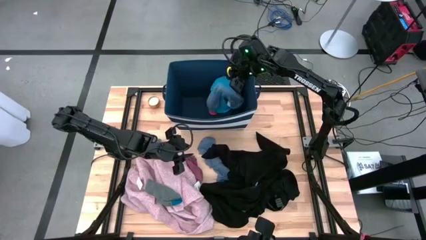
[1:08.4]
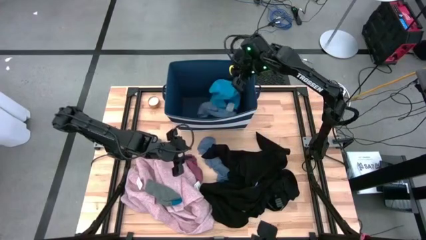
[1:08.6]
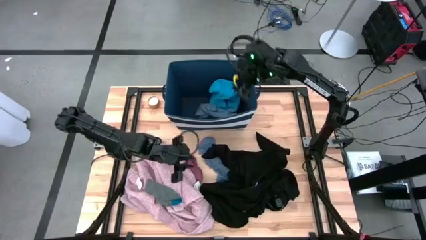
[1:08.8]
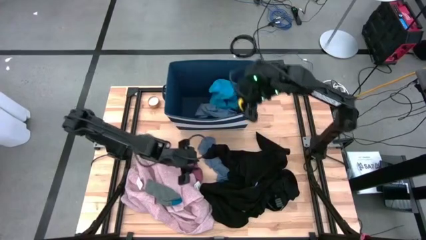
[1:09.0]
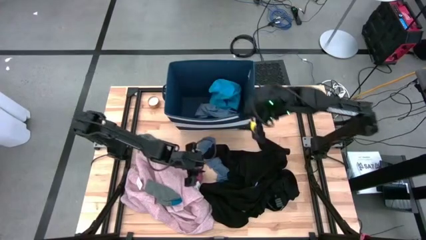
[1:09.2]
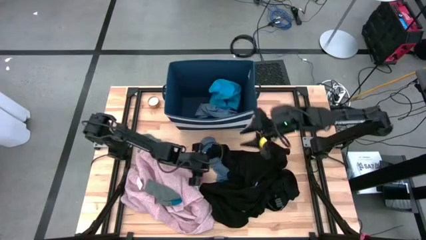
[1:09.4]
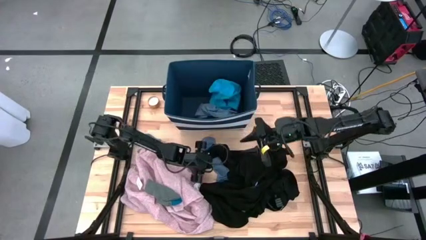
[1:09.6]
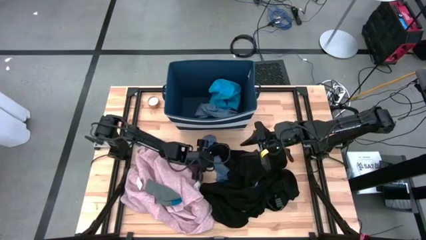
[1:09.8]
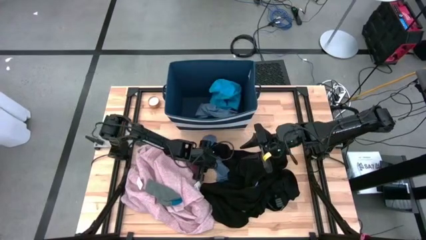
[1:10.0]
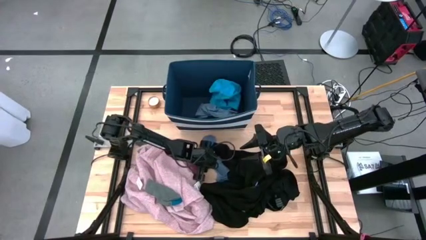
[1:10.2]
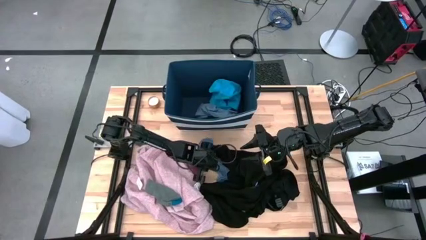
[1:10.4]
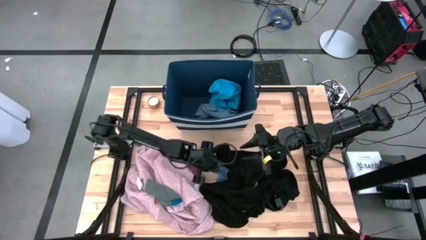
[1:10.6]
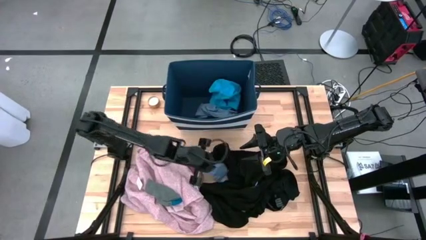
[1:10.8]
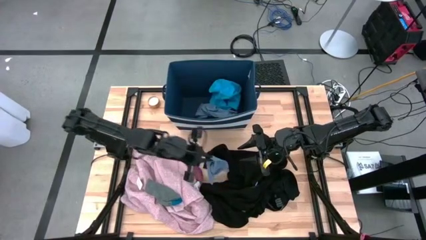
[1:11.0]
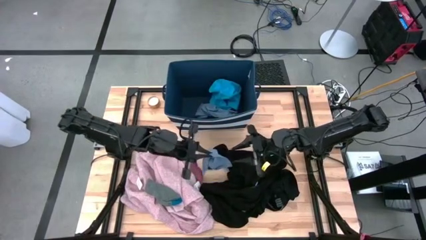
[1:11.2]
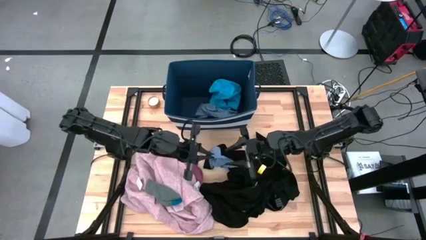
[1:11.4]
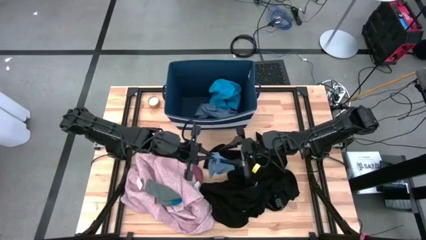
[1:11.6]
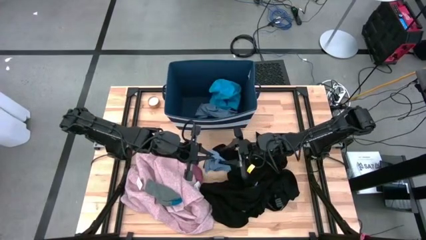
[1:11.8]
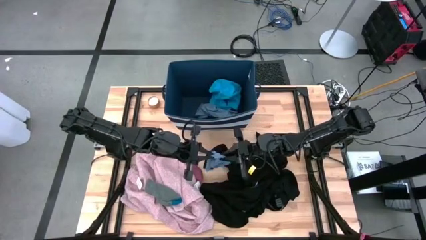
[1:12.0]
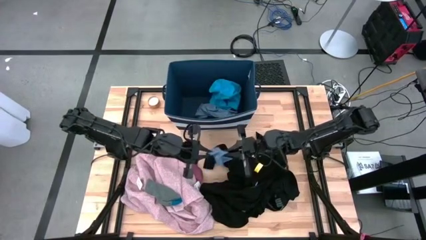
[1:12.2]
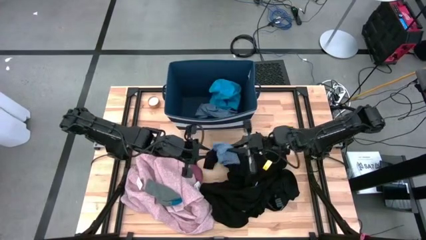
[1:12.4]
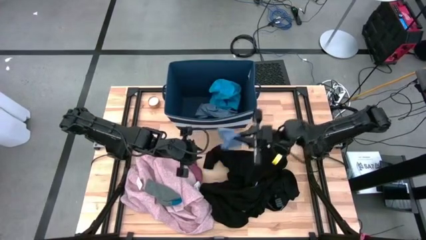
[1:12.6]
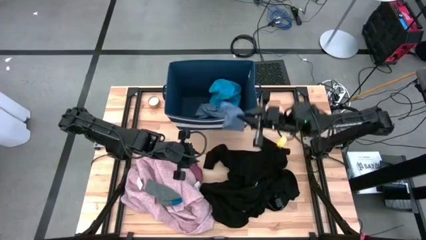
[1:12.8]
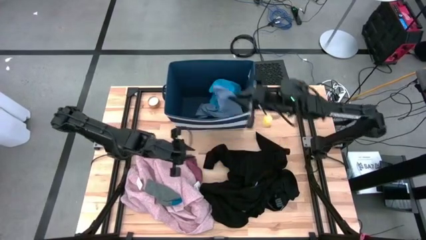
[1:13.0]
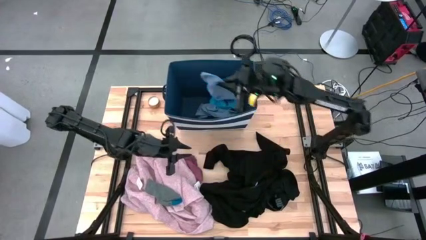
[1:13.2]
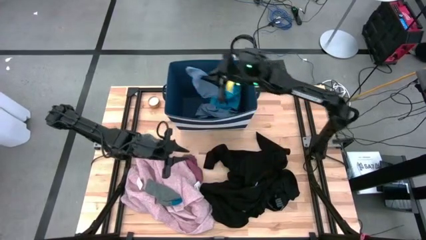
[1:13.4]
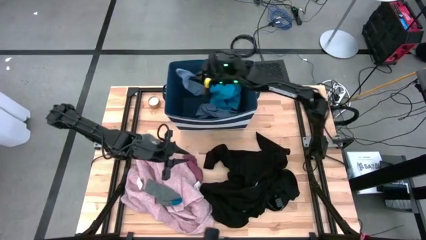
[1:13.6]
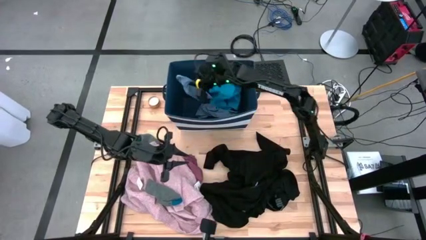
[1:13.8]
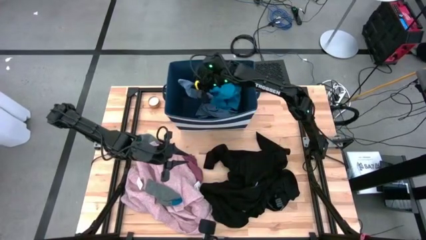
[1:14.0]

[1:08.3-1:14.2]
Task: Sort clothes
Put the light blue sock into the blue laundry bin

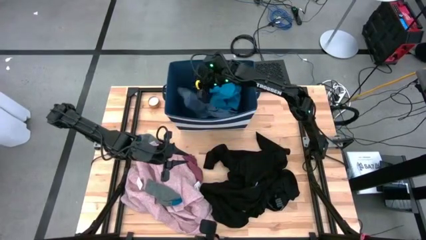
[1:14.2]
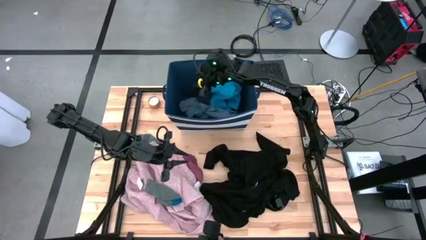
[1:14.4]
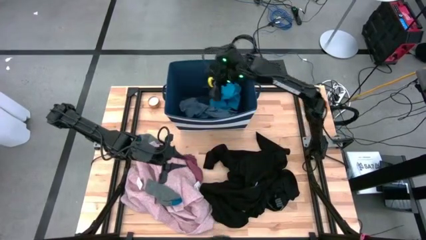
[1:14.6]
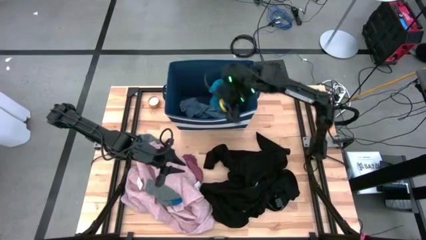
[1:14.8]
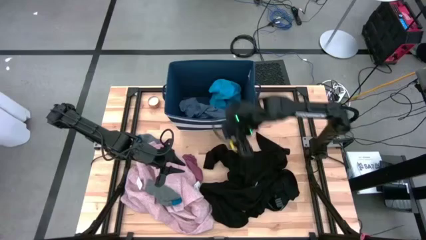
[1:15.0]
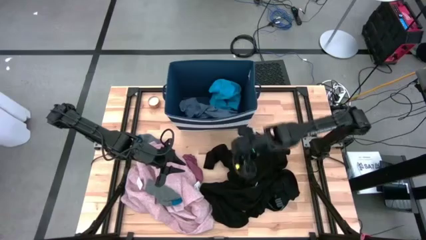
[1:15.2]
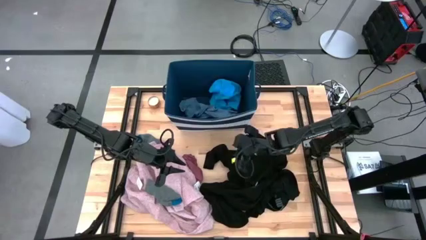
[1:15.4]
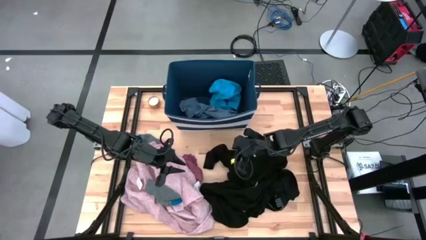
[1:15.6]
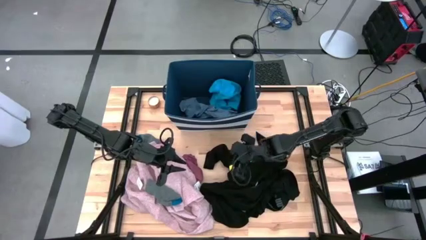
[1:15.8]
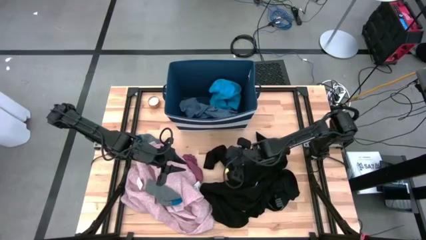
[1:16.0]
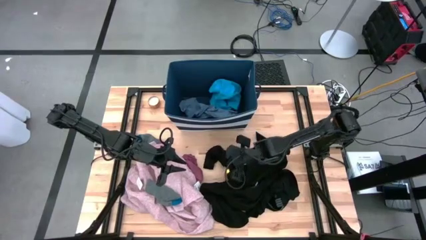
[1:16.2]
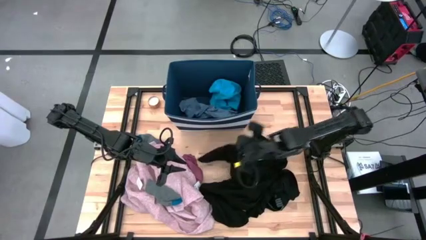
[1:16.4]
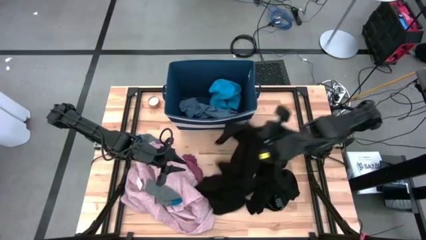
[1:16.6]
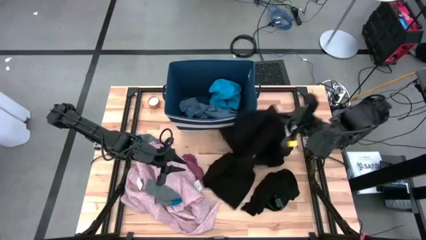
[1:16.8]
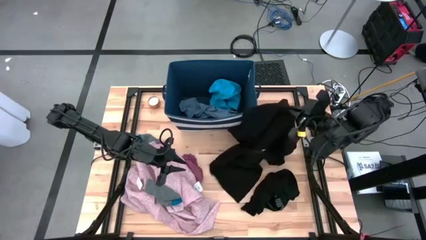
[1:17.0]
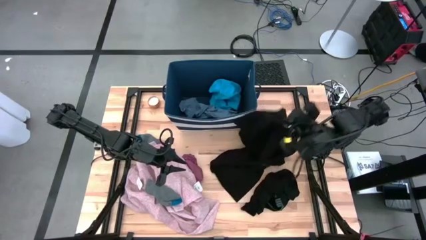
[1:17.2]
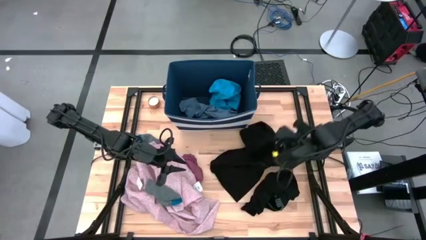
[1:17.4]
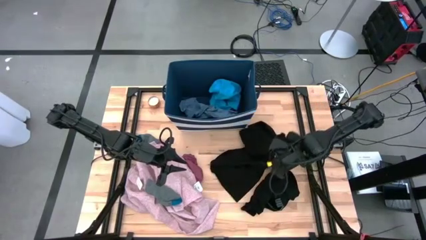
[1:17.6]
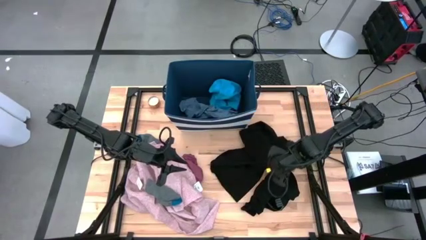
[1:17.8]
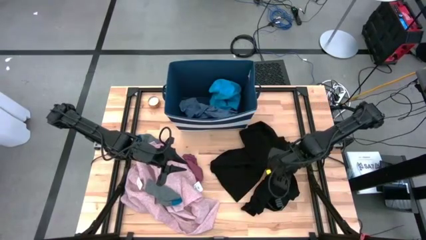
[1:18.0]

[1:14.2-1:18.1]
Move the black shirt to the center right on the table

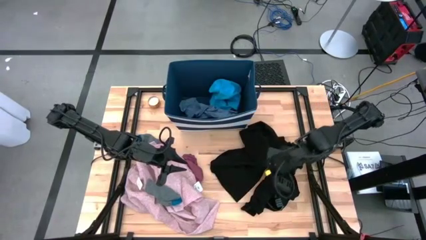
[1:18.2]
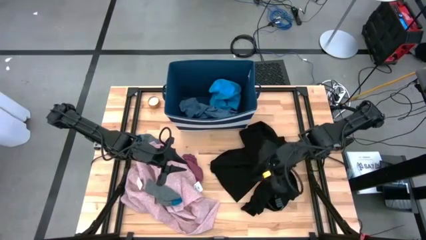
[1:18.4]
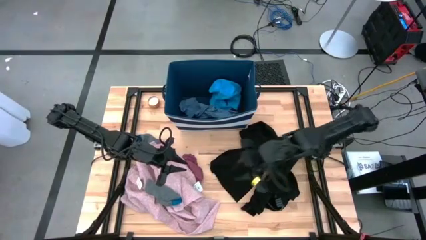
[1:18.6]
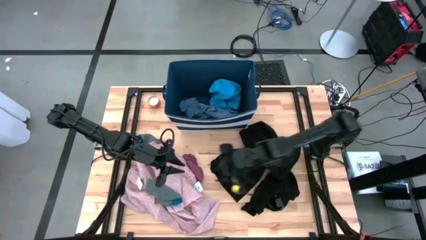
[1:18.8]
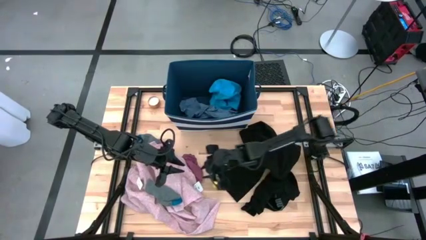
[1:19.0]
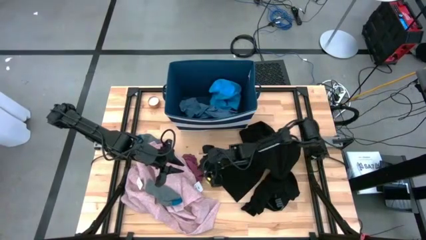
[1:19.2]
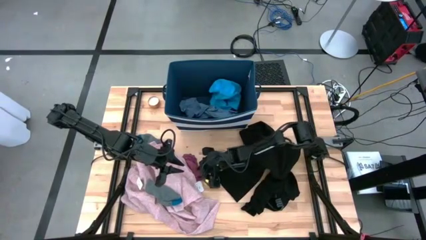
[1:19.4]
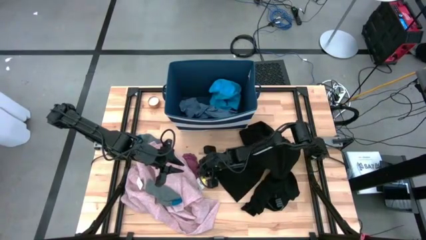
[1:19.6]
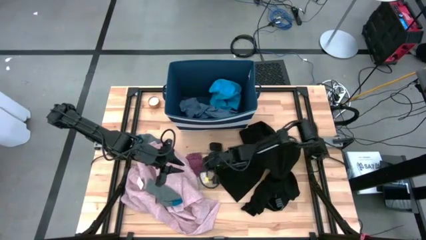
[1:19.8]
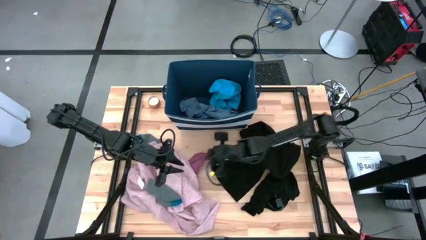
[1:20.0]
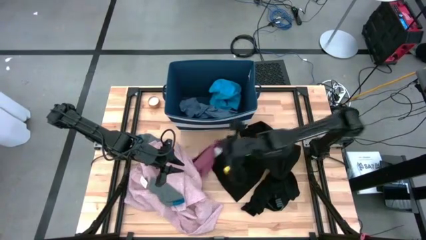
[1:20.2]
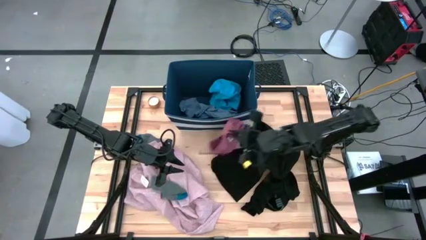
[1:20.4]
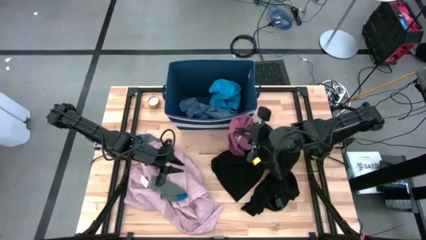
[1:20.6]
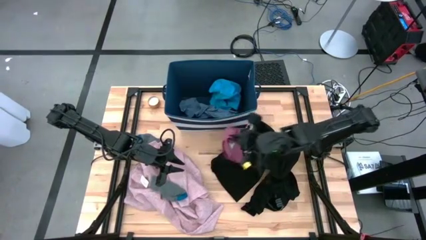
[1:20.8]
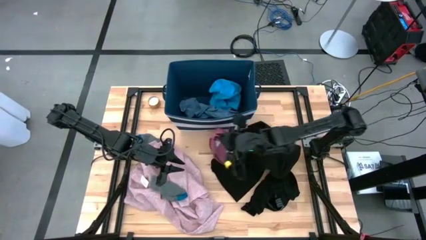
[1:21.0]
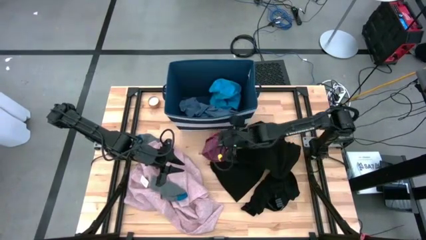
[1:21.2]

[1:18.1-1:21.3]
Move the maroon boxer shorts to the center on the table

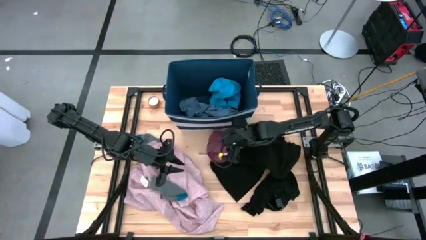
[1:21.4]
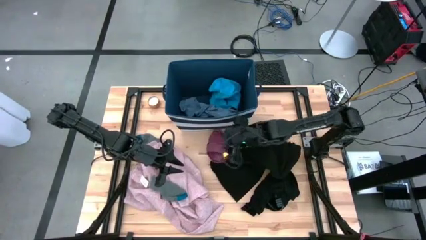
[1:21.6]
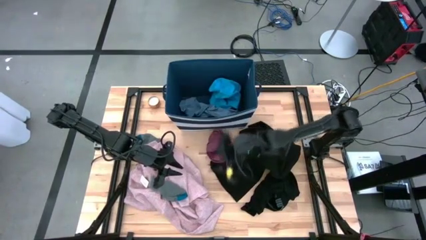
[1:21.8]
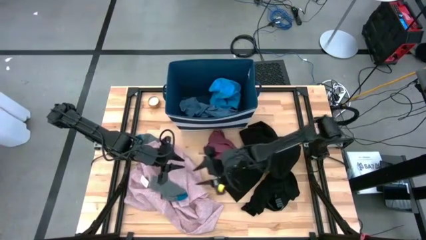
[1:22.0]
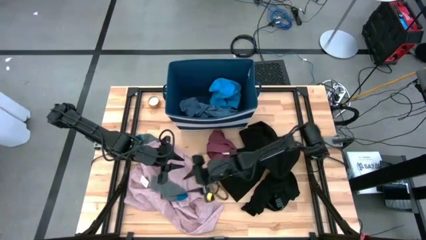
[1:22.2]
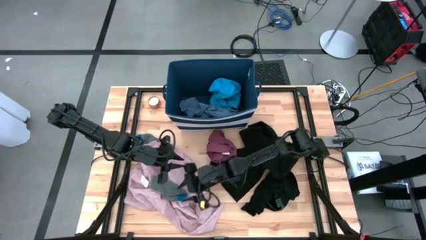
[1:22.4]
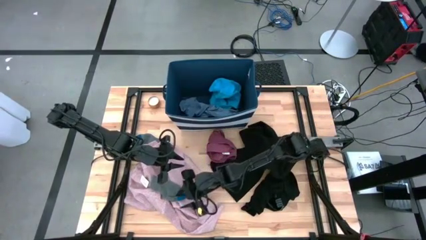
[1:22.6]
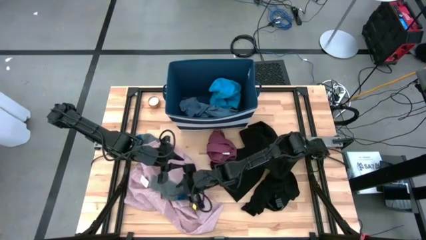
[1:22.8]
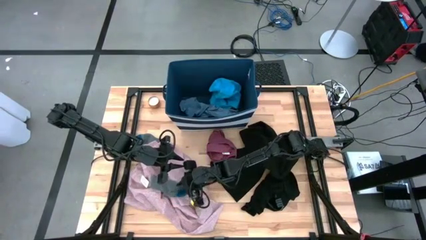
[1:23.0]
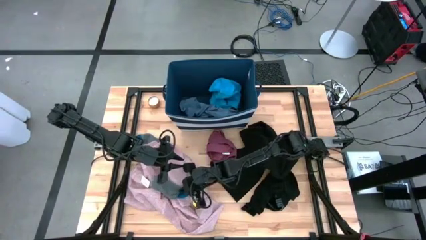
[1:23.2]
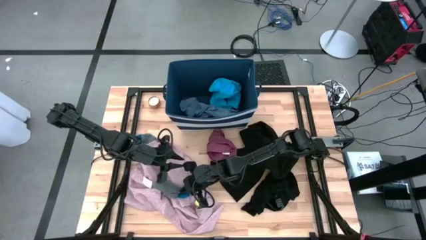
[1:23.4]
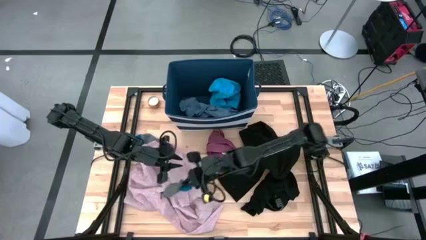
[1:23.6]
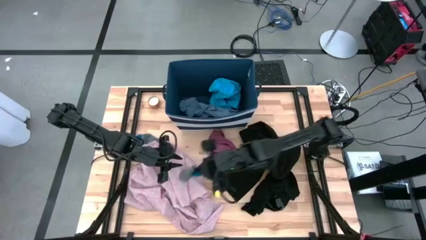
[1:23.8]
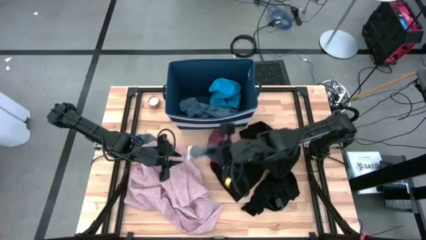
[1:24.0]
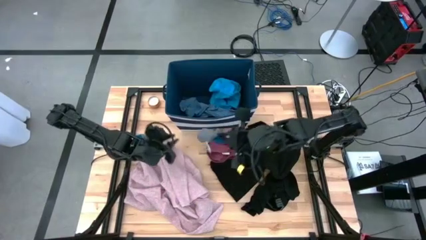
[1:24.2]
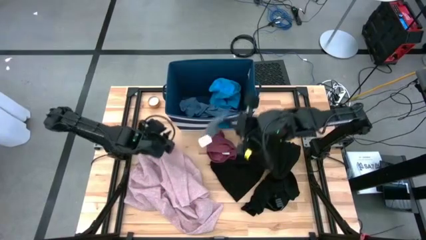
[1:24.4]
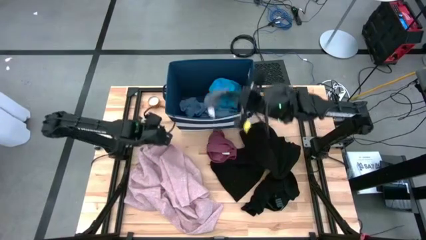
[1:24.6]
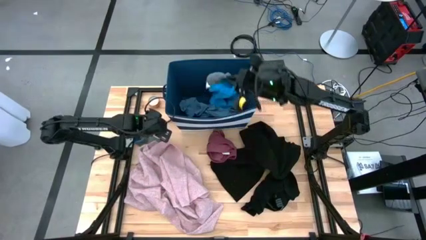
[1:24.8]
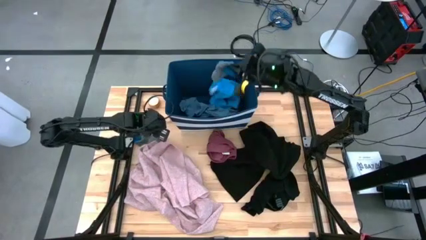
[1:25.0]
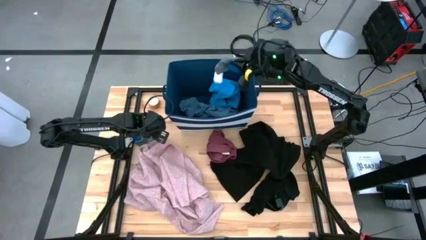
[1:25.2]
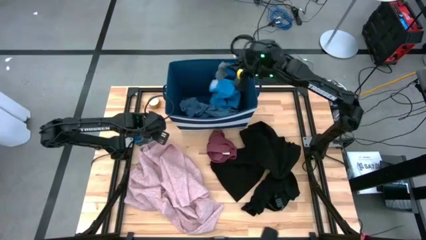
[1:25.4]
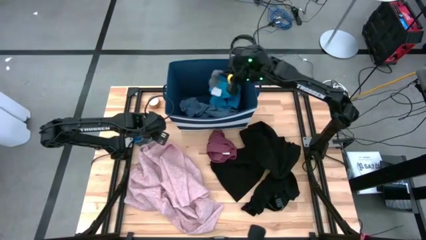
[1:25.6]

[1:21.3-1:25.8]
Put the gray sock into the blue laundry bin
